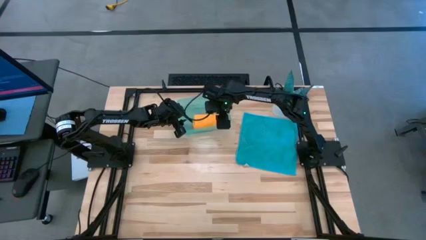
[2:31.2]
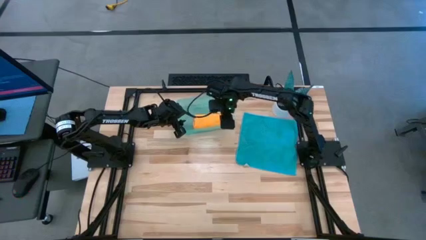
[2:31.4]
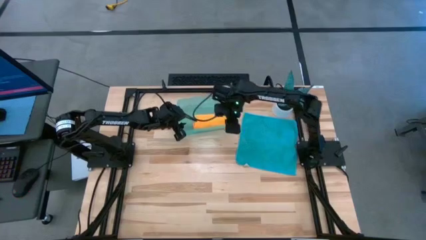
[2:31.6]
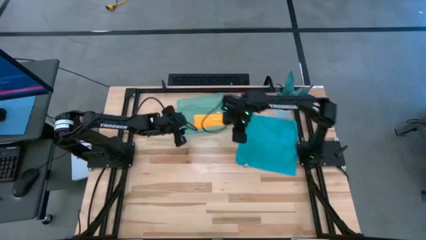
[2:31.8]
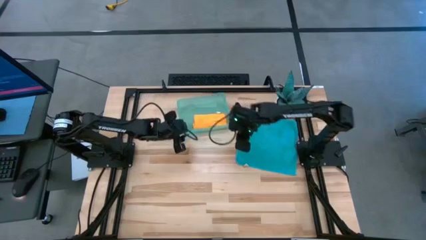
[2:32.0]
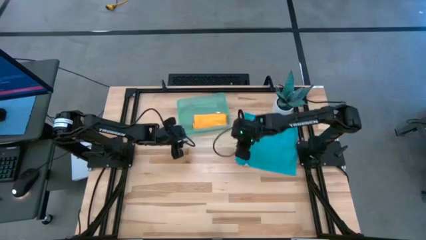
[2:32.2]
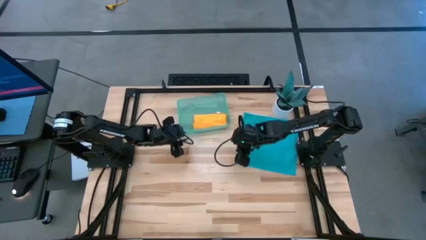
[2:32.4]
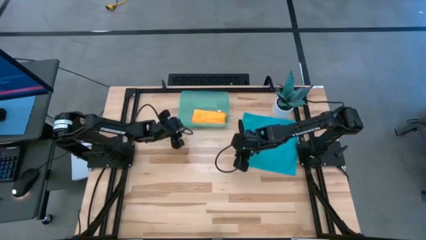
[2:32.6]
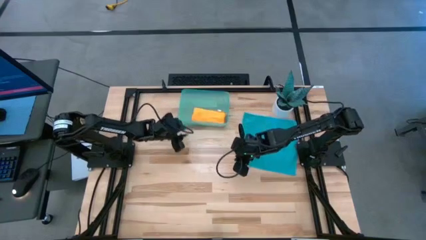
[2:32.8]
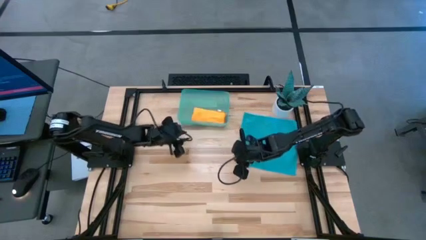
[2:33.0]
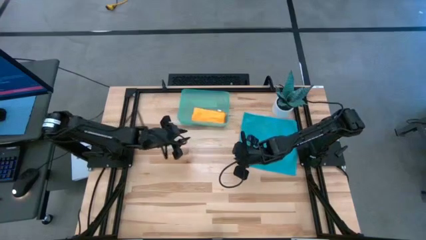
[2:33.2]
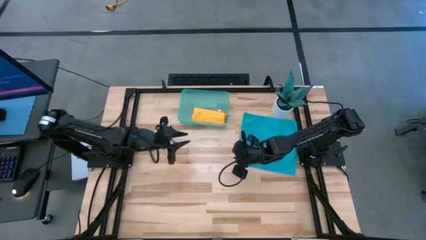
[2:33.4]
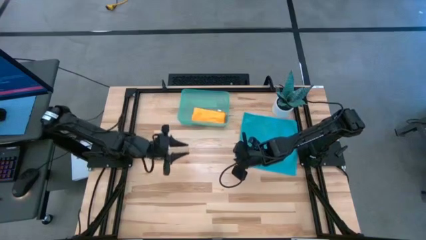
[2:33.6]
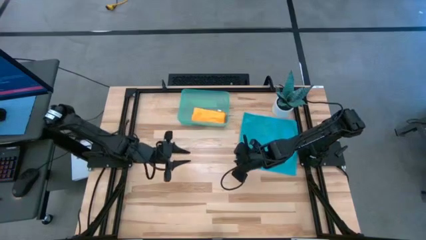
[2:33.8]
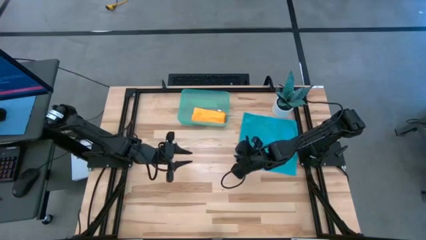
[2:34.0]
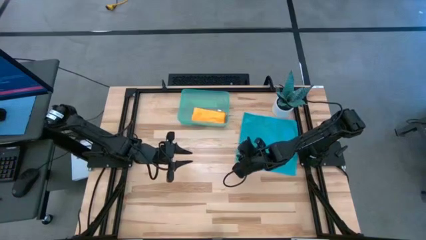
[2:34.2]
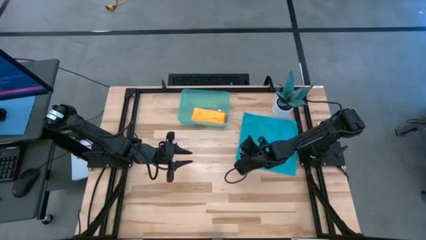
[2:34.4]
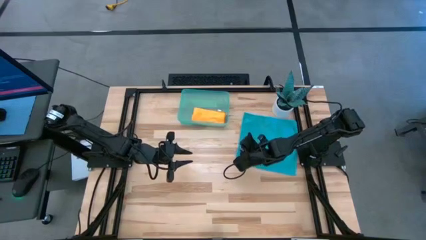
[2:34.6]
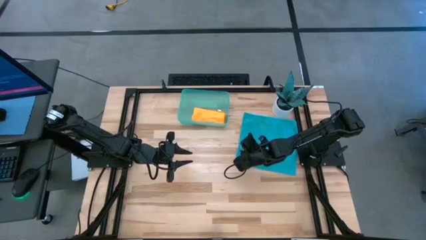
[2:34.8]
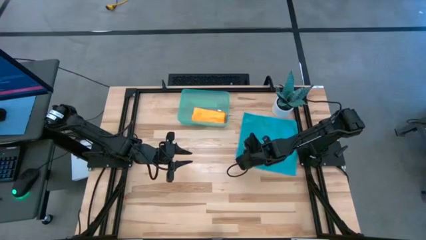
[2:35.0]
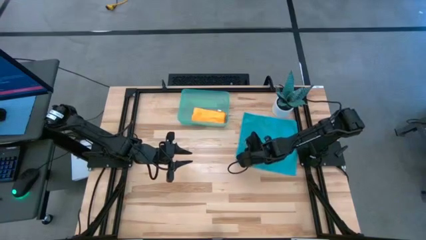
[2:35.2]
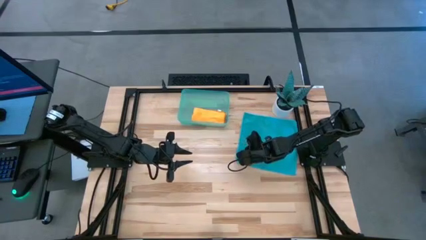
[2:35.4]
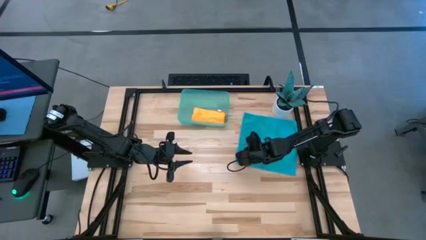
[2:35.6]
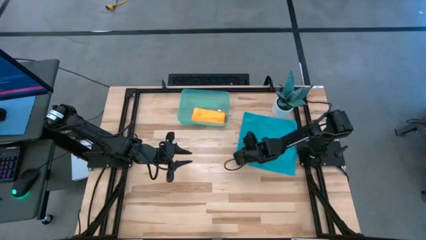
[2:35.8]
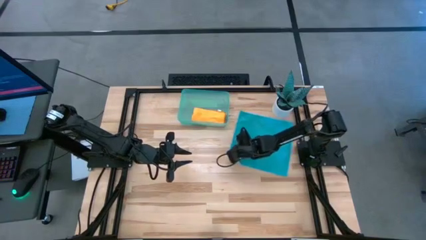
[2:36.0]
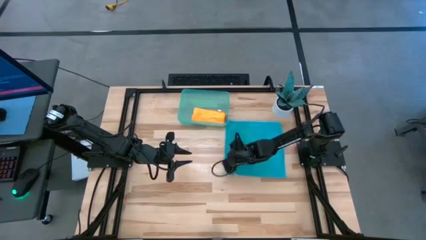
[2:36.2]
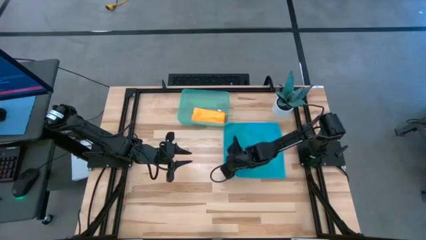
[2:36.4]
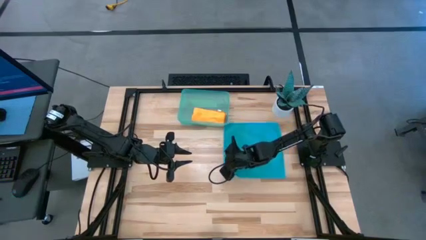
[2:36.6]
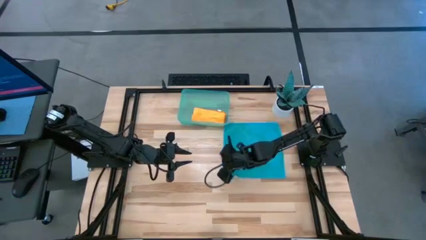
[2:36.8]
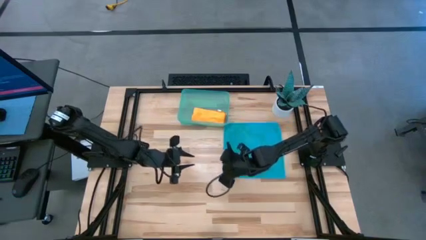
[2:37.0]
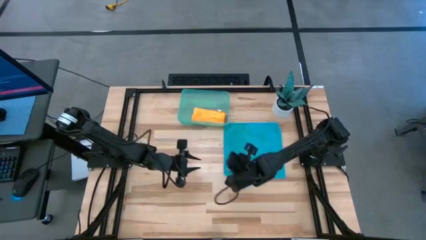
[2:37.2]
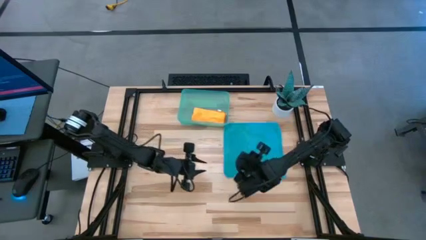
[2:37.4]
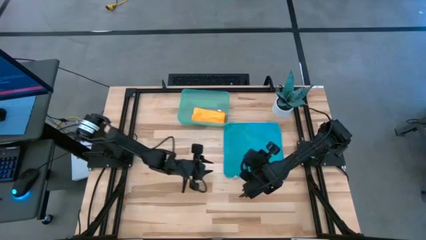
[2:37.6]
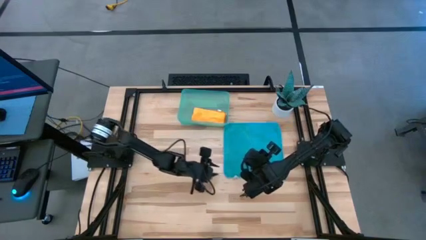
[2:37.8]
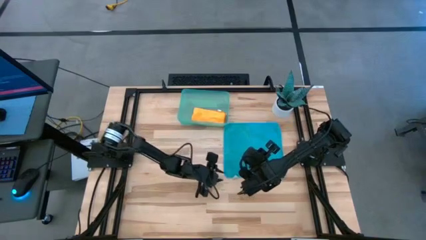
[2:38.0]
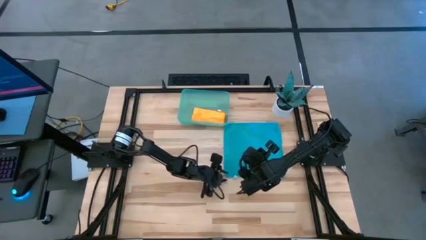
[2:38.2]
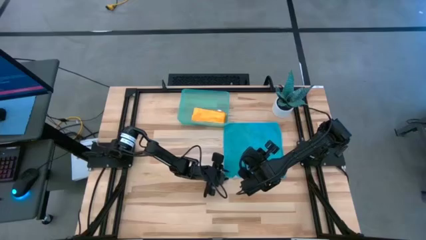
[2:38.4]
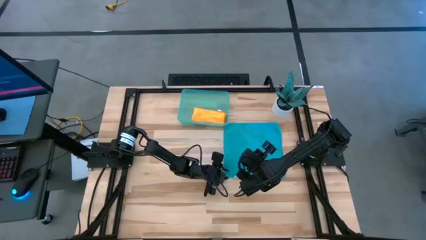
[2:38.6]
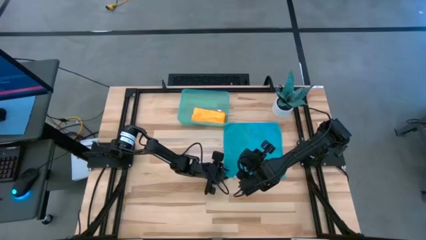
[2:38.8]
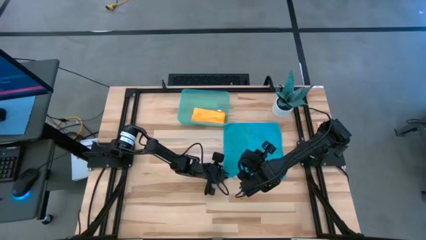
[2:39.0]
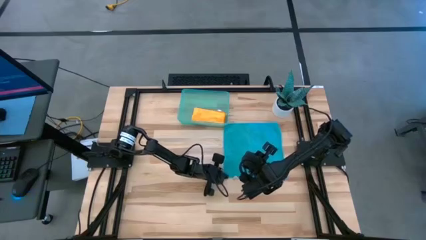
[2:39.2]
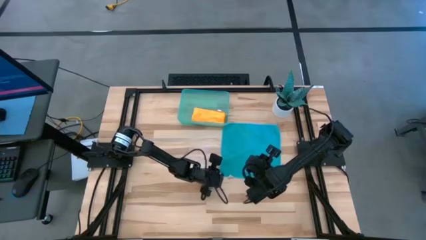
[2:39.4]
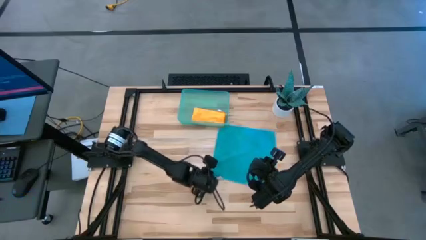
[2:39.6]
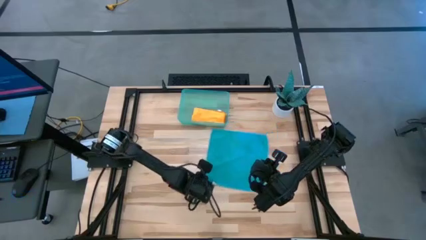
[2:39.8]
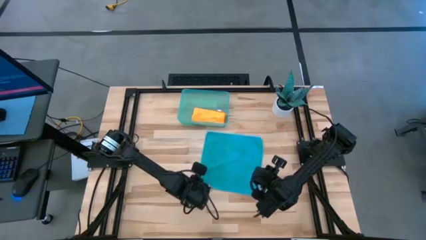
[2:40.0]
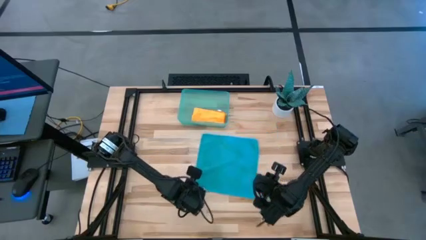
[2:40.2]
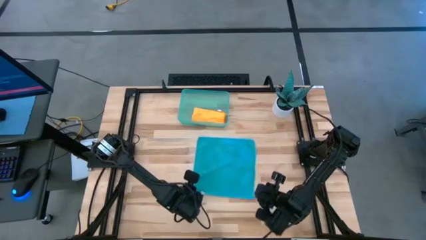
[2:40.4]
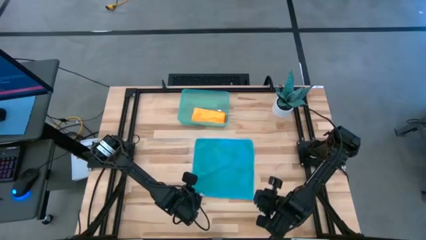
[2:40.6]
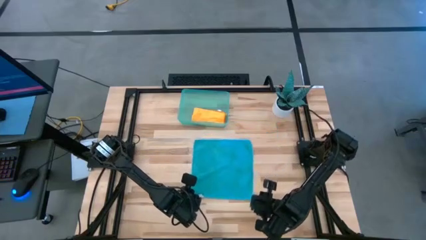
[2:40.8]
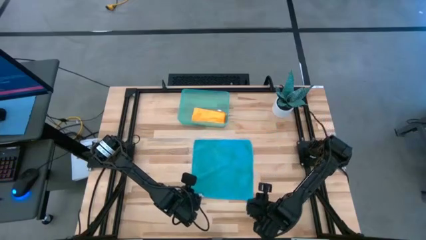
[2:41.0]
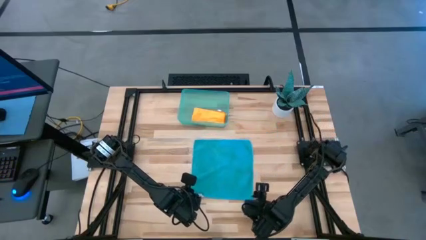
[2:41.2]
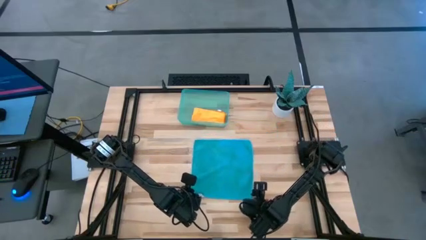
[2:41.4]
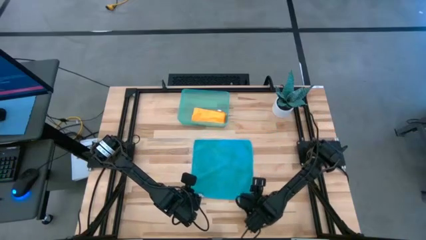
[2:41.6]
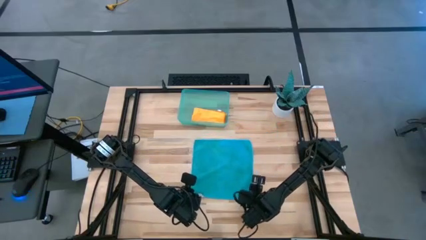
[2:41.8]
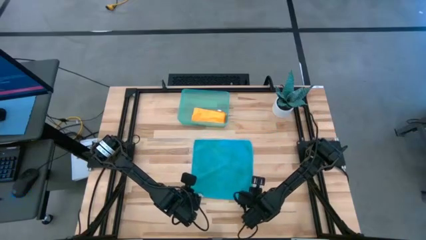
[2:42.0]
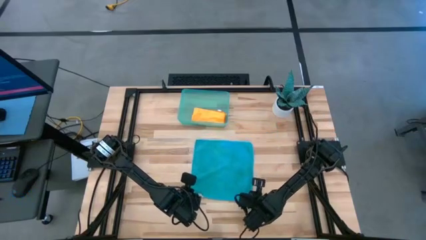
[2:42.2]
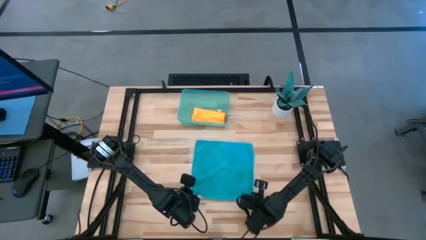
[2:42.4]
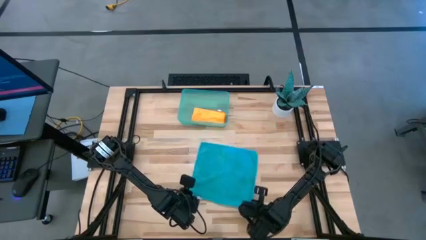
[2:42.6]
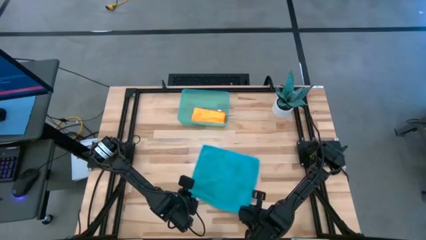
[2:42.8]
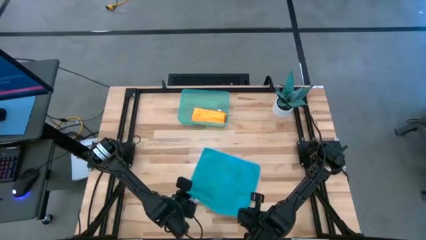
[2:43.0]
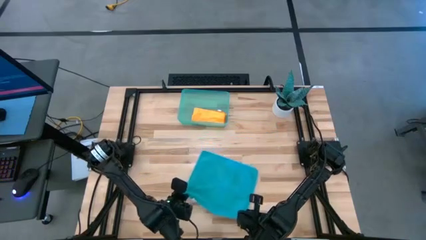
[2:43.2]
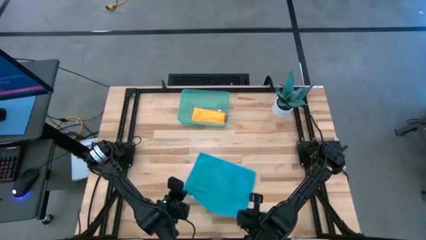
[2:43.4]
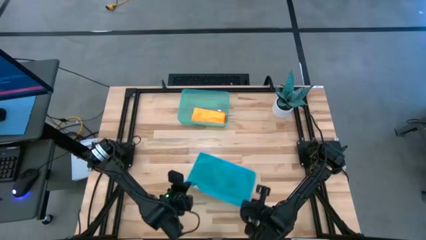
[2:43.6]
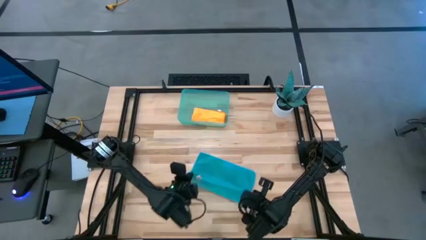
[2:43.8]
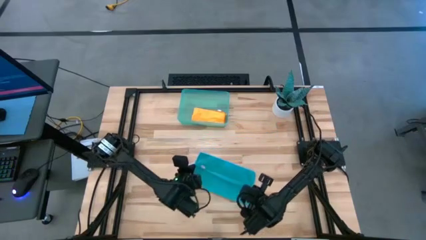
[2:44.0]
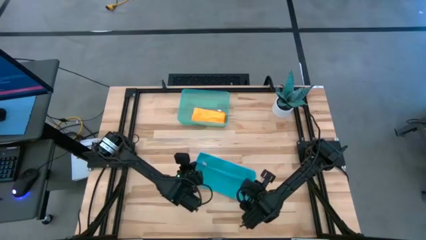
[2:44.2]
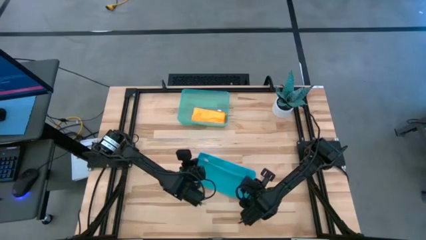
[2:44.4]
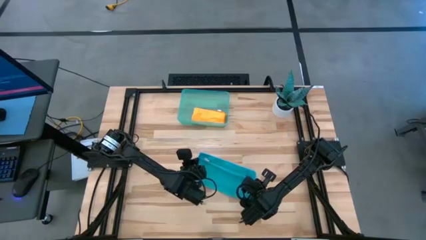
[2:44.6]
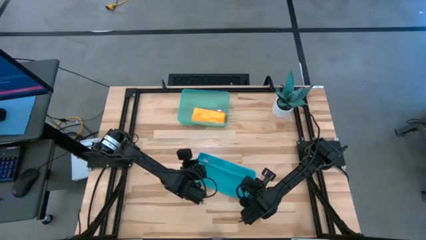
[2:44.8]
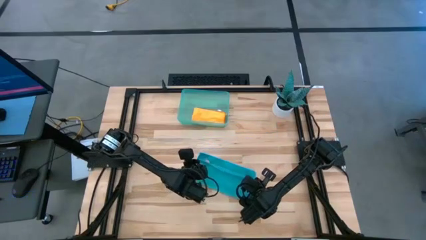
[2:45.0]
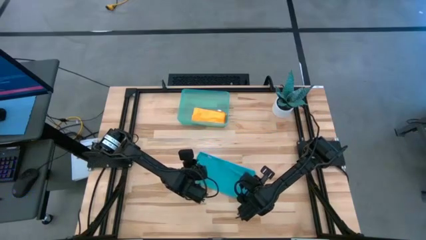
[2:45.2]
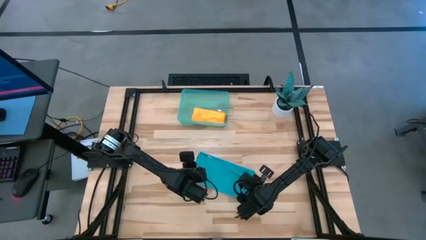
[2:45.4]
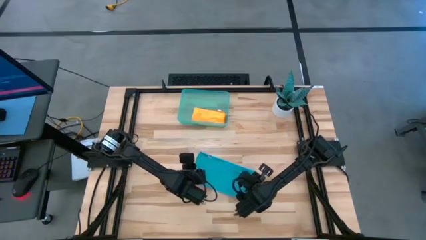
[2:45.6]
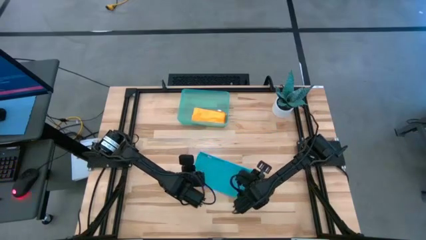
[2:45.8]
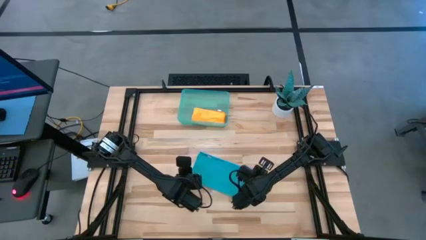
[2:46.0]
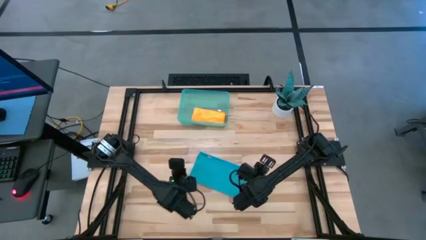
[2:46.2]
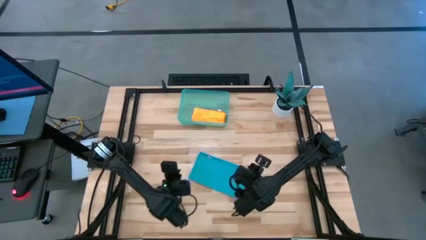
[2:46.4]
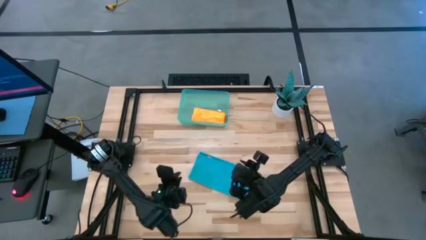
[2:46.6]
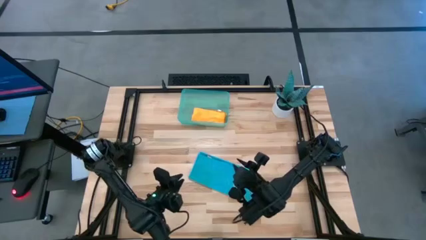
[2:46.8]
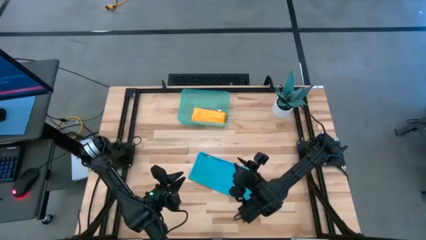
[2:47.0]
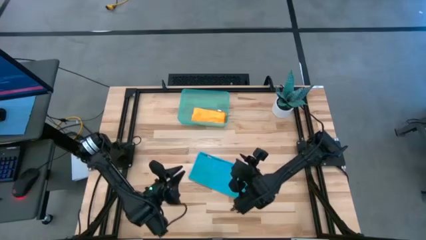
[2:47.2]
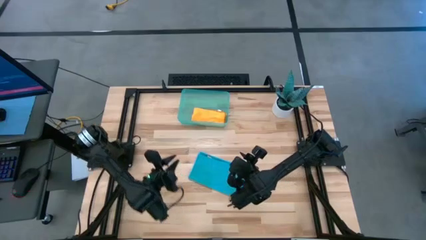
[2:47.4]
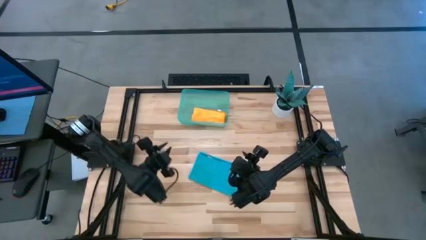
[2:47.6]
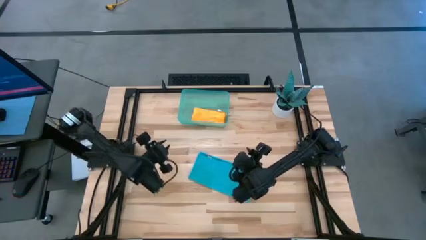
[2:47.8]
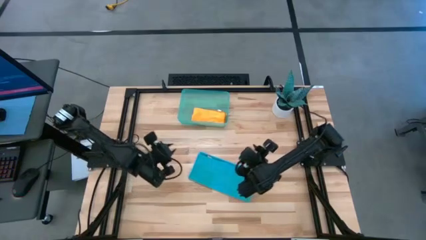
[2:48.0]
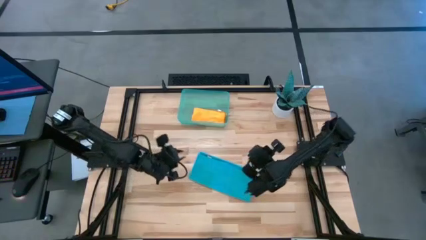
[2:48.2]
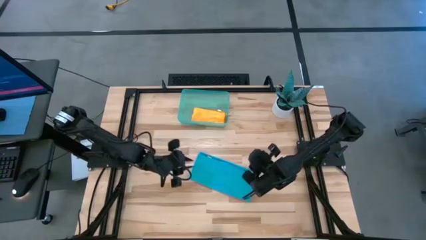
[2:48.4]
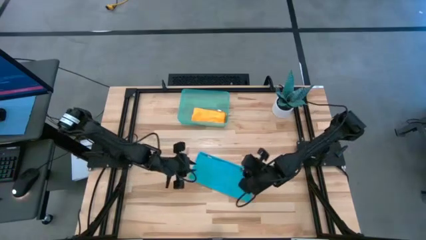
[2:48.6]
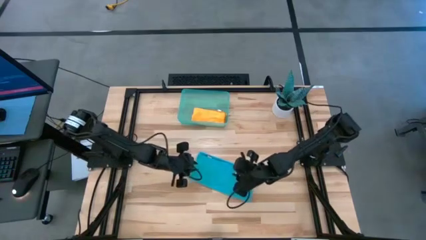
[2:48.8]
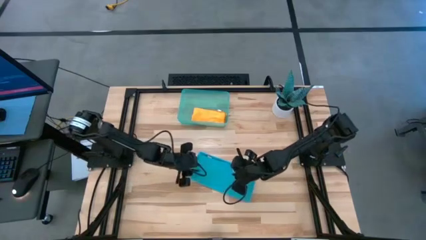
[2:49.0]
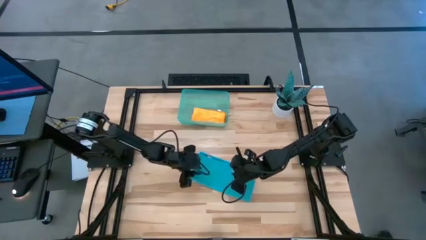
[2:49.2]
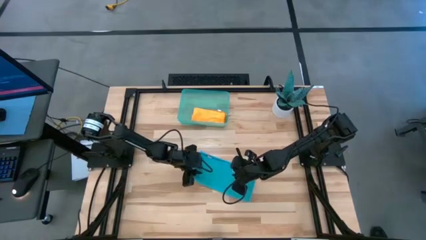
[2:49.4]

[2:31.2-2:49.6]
Task: Roll microfiber towels into tight, uniform cylinder then place into a basket
Roll the blue microfiber towel
